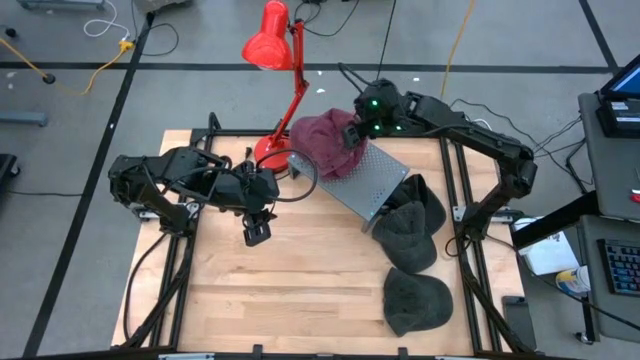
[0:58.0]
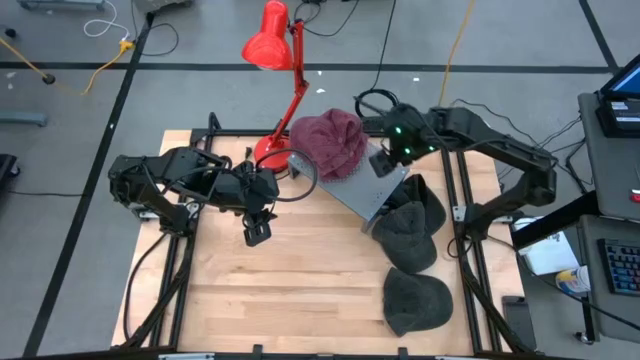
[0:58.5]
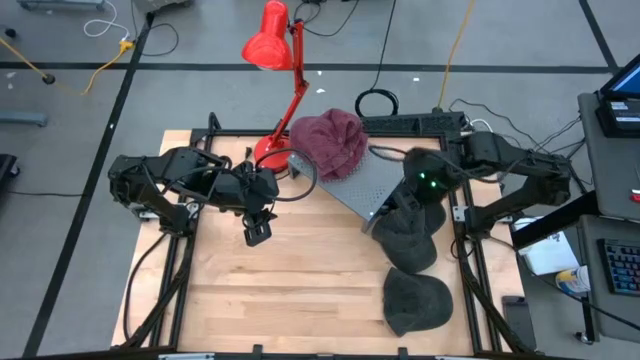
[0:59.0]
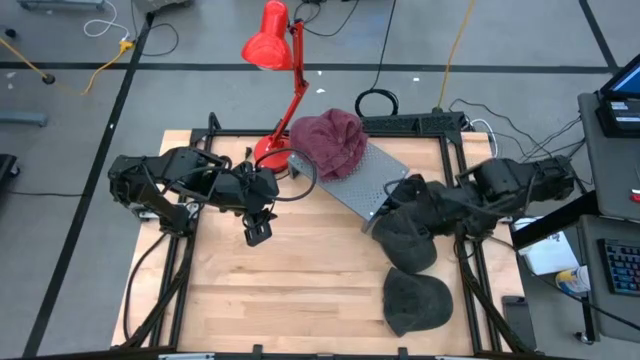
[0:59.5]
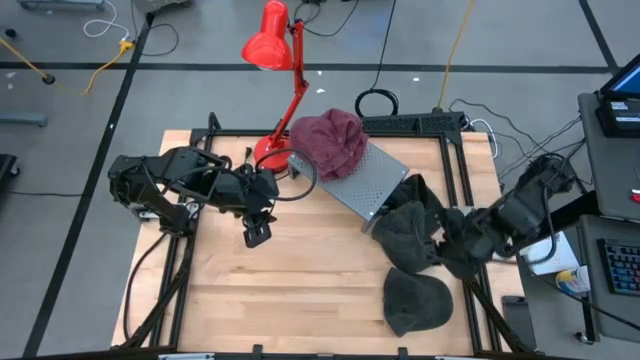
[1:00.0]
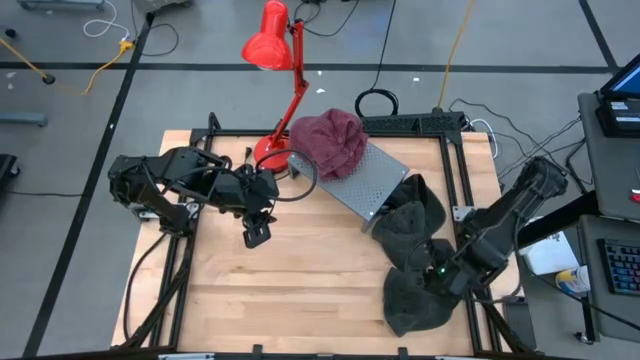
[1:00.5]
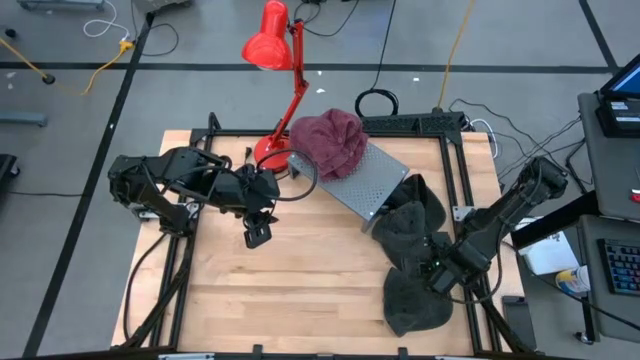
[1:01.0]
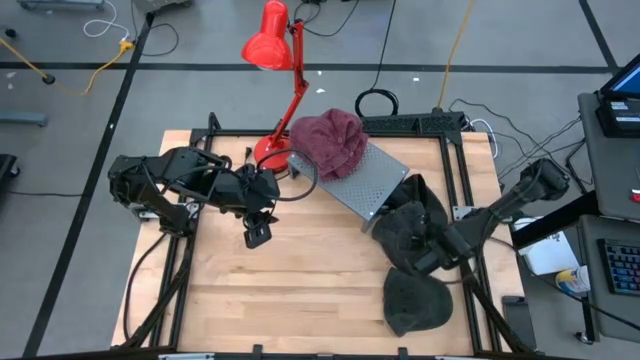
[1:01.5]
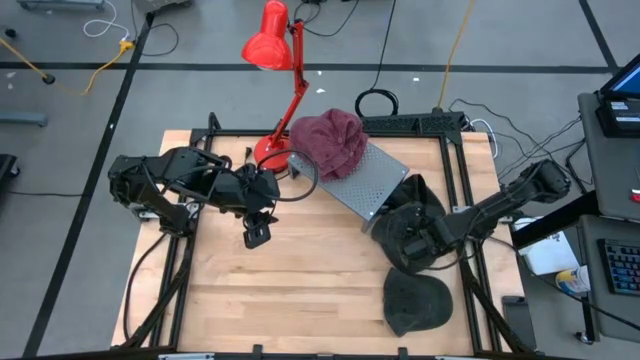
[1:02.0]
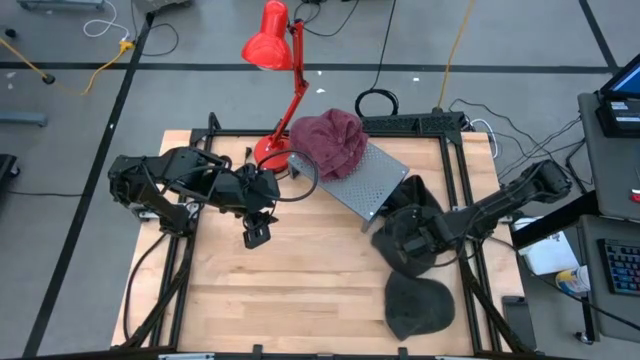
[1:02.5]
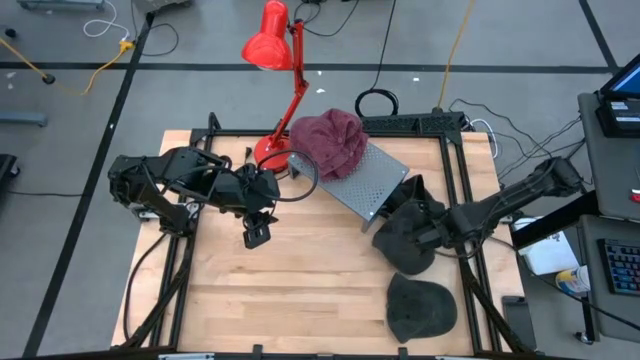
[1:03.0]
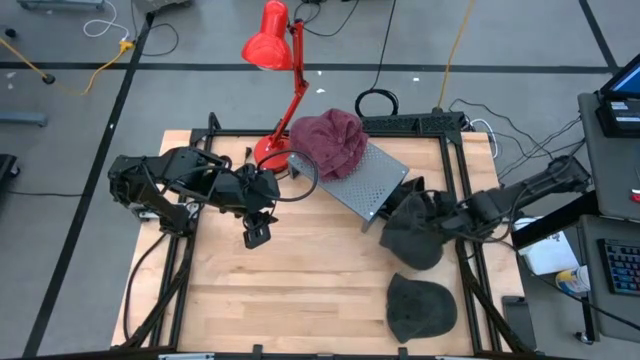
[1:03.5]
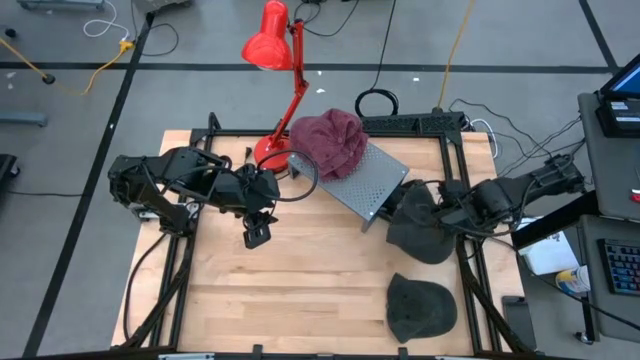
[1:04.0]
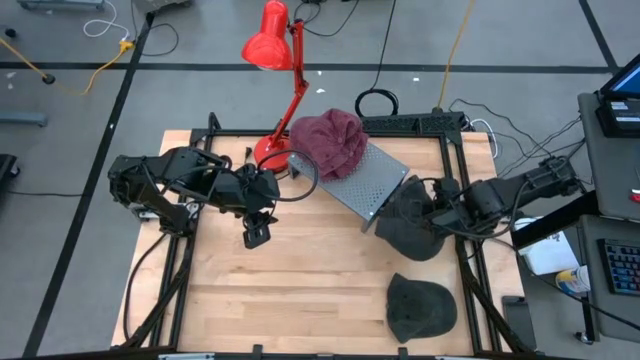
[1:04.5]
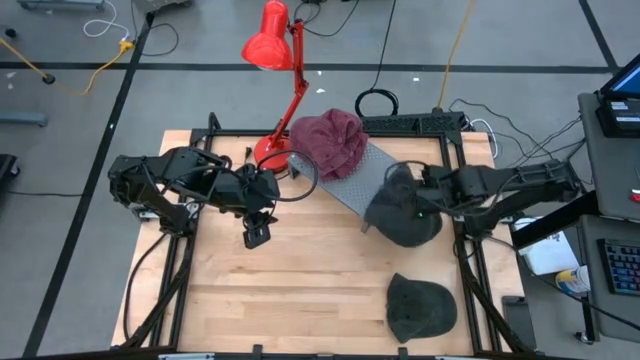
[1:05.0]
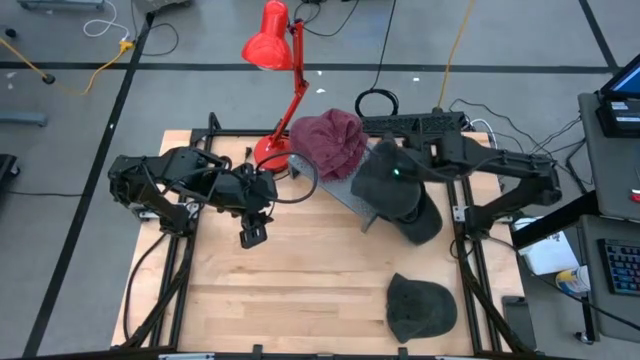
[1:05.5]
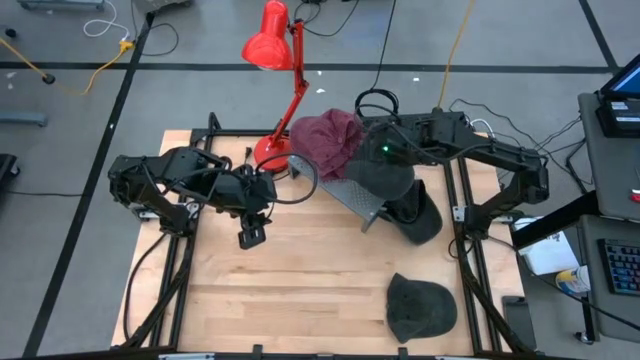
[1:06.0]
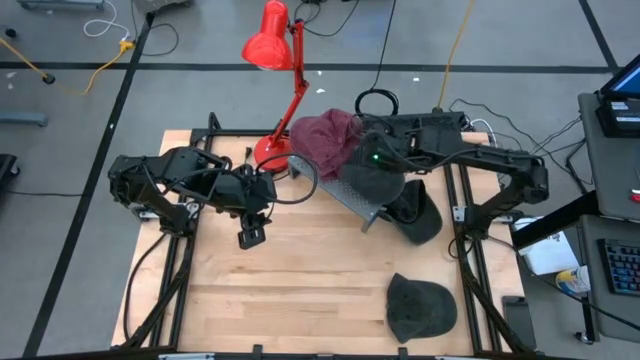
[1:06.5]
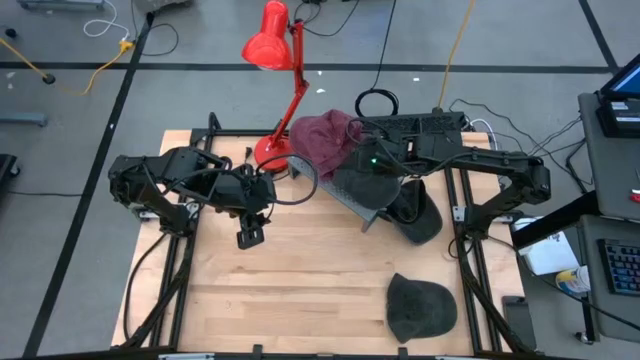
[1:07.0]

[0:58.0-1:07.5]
Task: Pick & Place hat
Put the black cap on the shelf

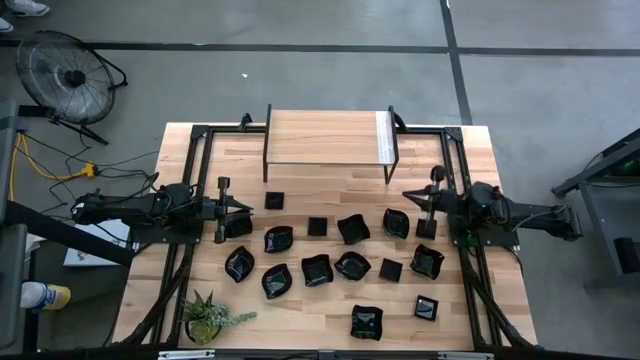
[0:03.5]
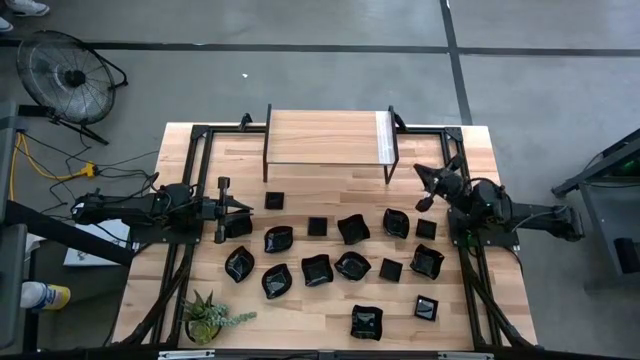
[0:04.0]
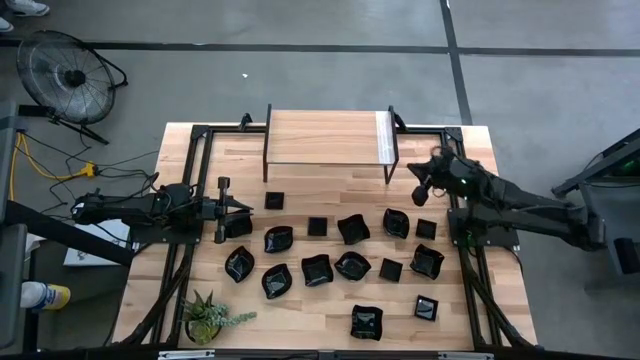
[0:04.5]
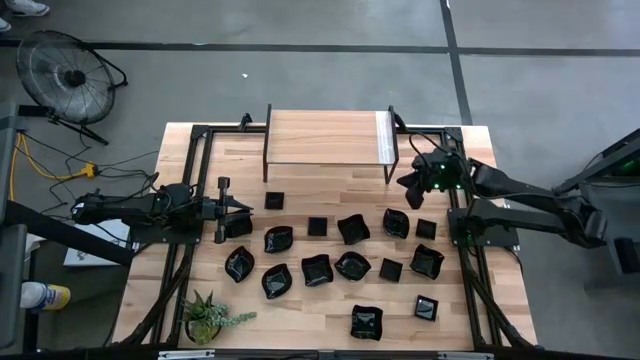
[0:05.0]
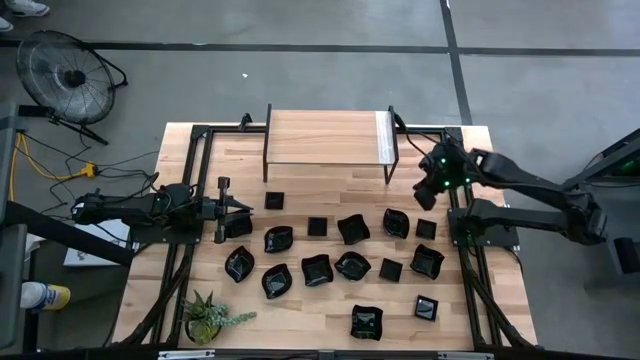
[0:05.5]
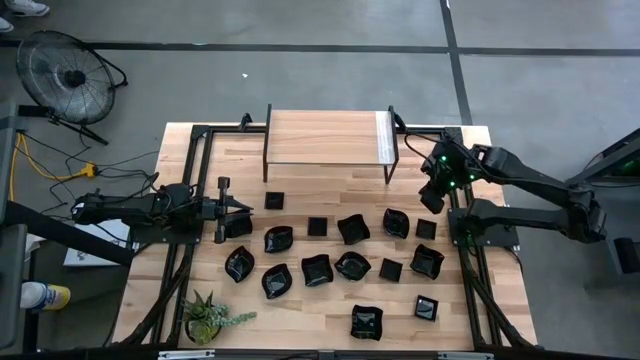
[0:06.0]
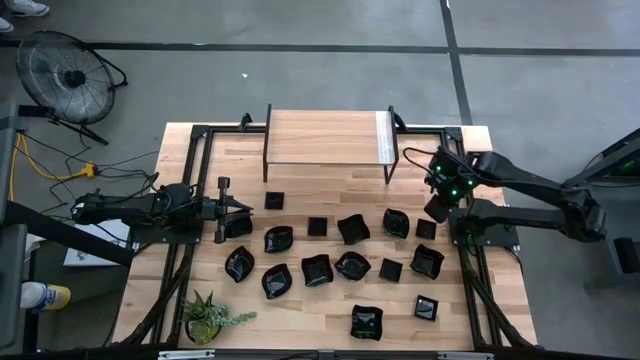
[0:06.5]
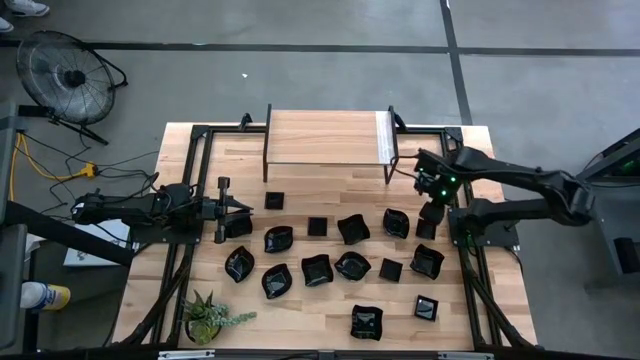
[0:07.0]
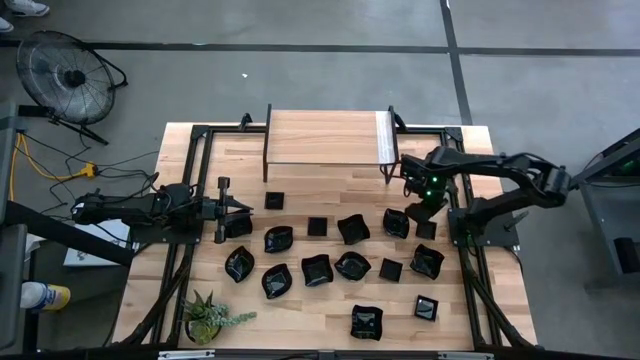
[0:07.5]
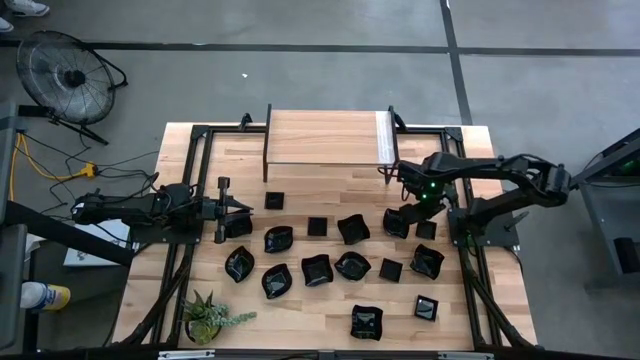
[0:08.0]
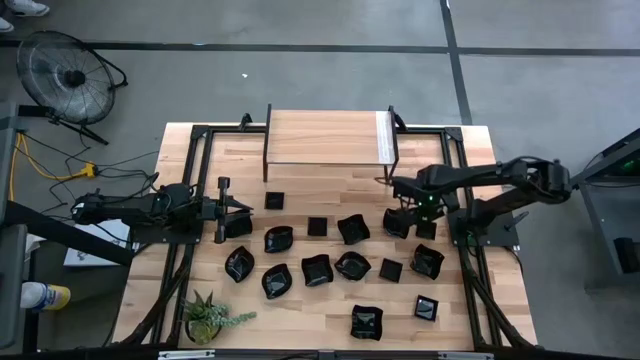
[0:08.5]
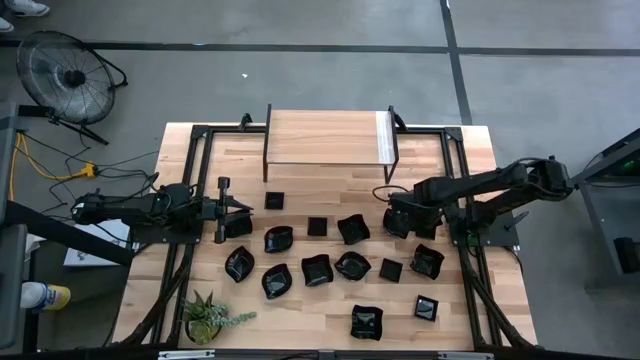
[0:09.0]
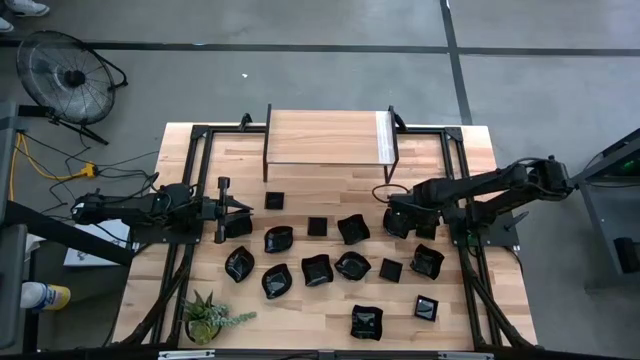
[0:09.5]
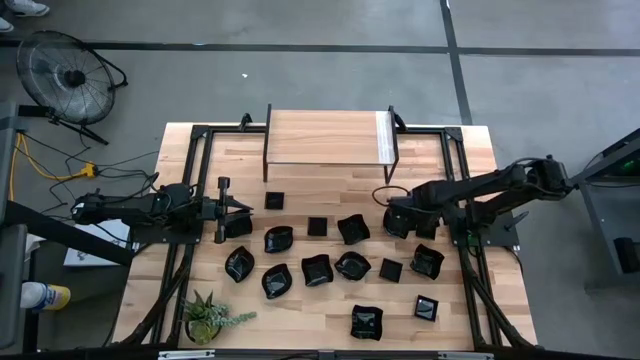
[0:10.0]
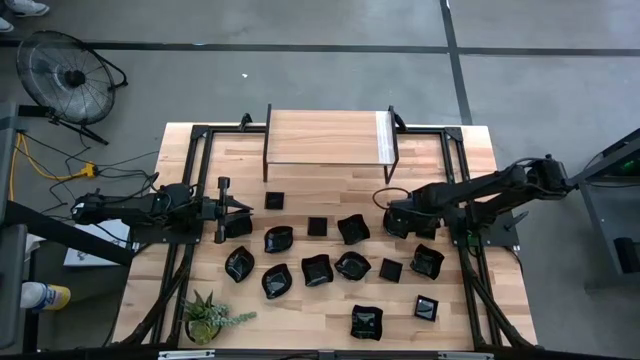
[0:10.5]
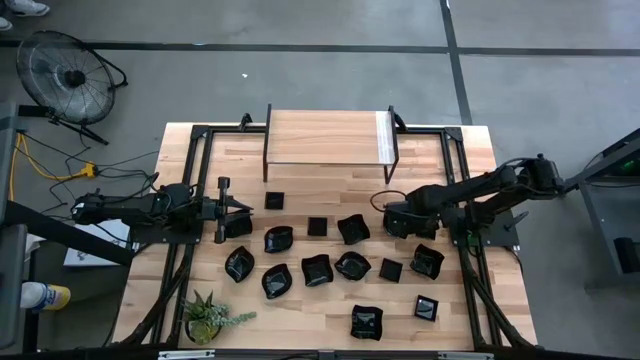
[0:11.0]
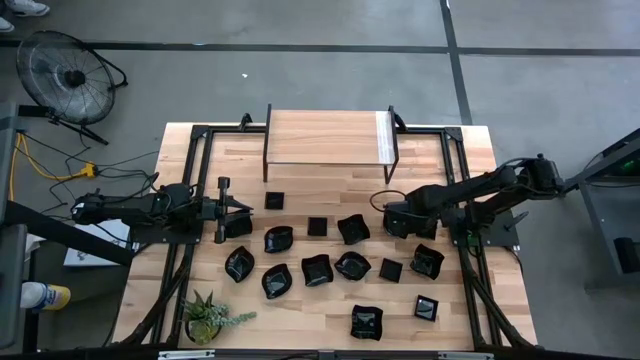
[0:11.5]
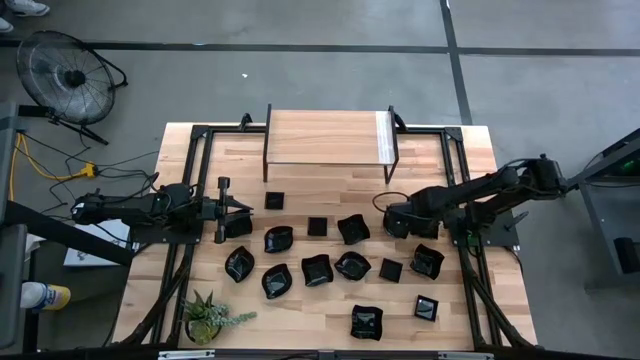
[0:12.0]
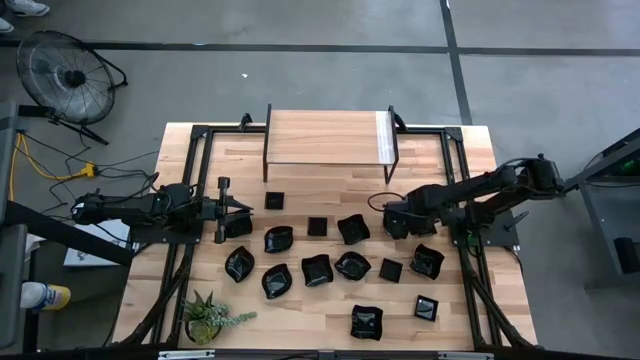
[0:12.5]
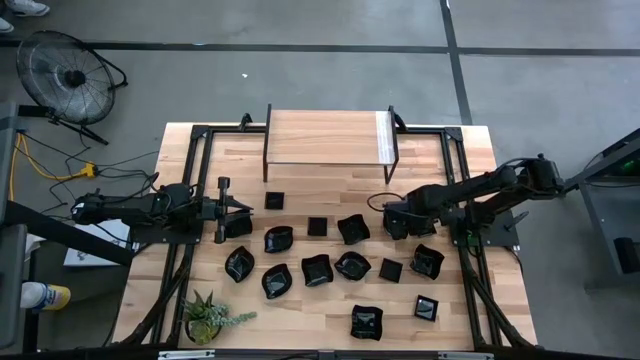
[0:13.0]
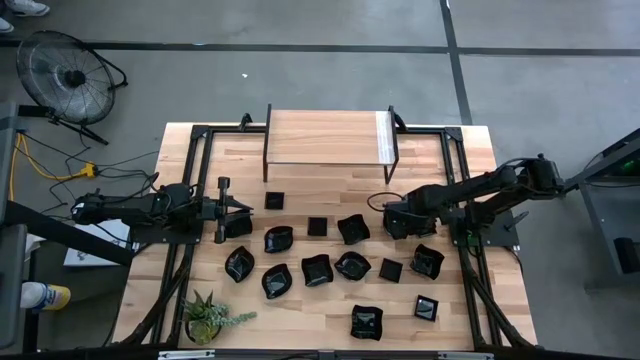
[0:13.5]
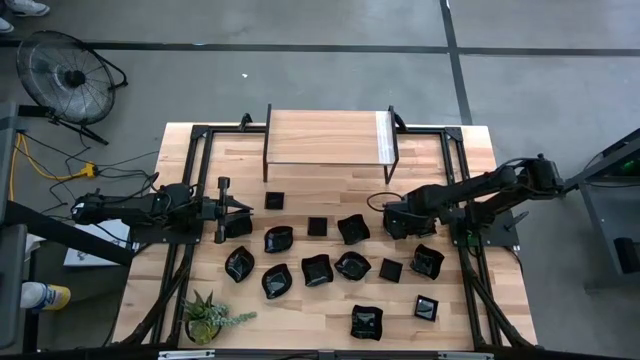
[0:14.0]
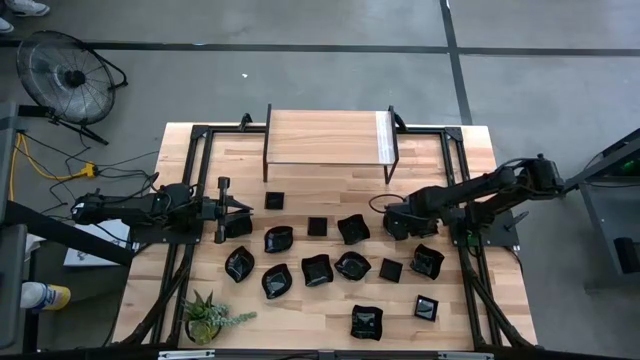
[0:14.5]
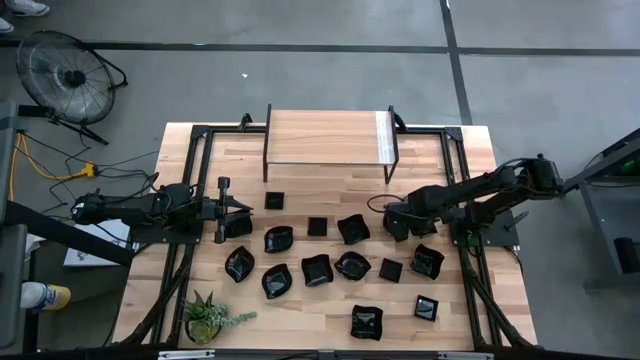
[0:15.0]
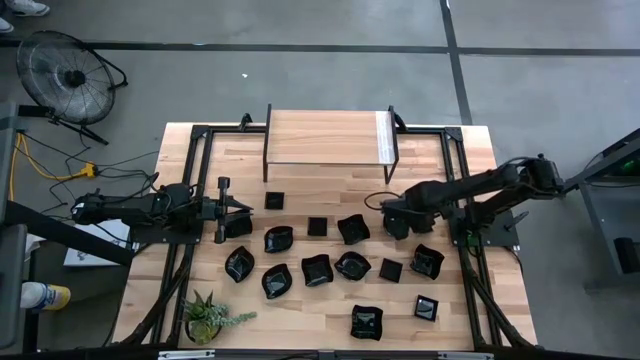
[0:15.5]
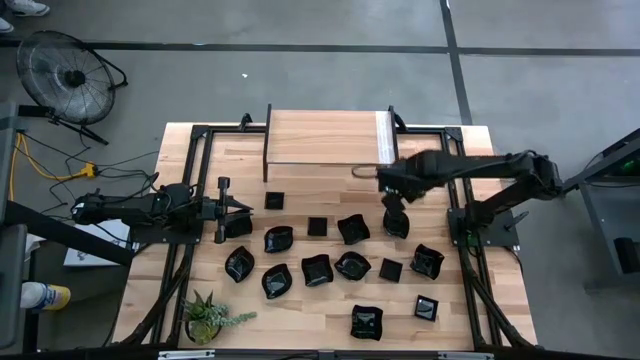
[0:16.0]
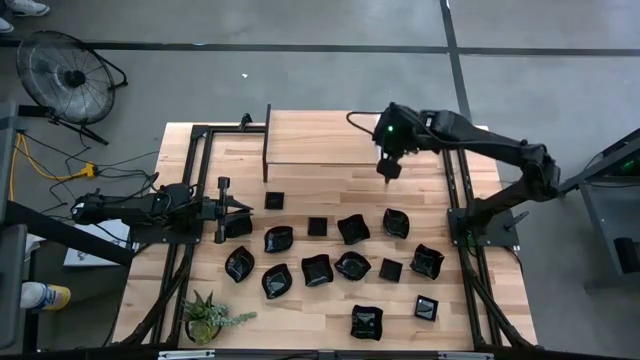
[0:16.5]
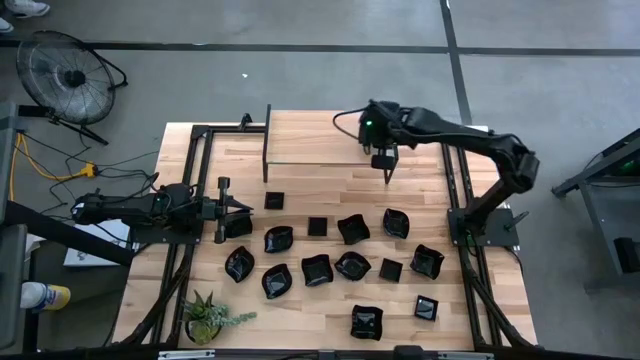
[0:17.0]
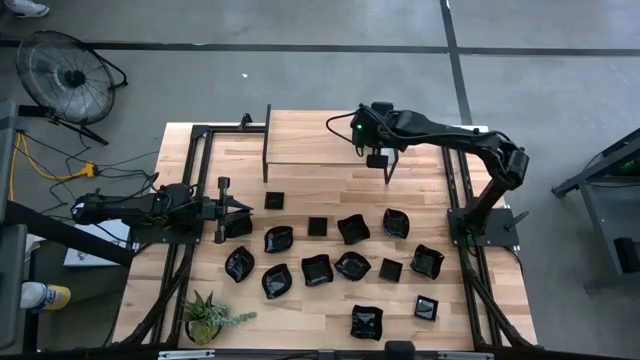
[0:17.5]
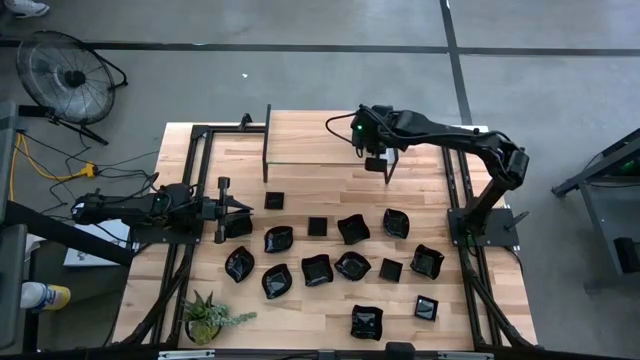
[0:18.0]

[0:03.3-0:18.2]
Task: Pick & Place Mini shaped plates
Put the black square plate on the shelf
